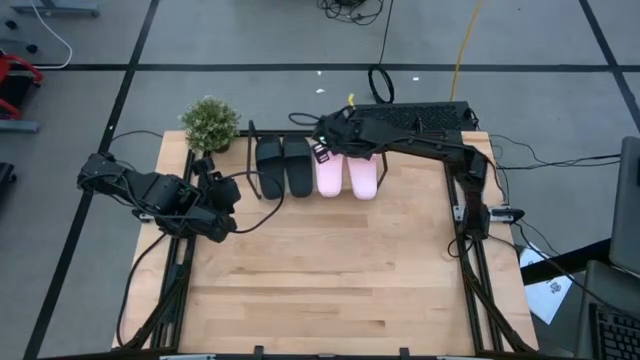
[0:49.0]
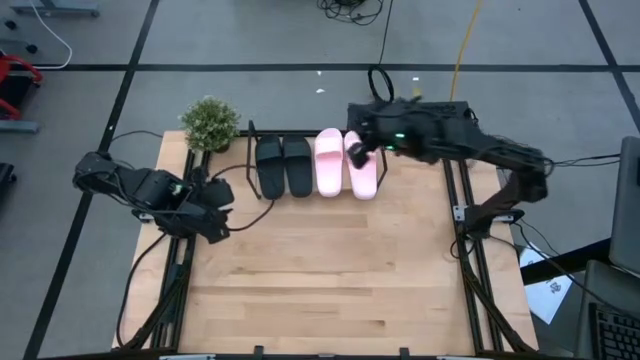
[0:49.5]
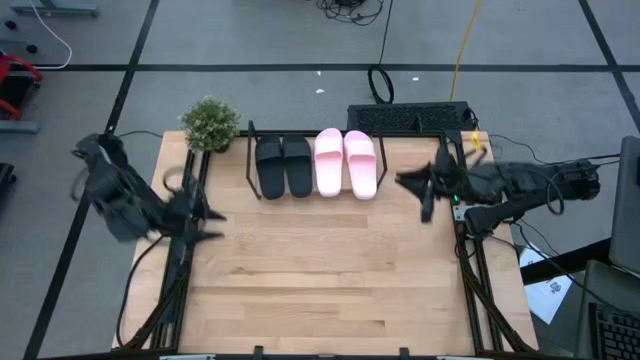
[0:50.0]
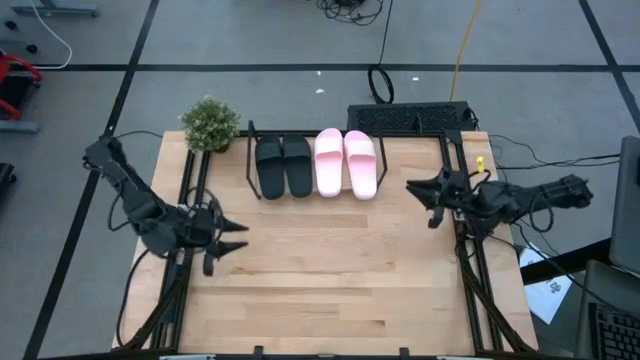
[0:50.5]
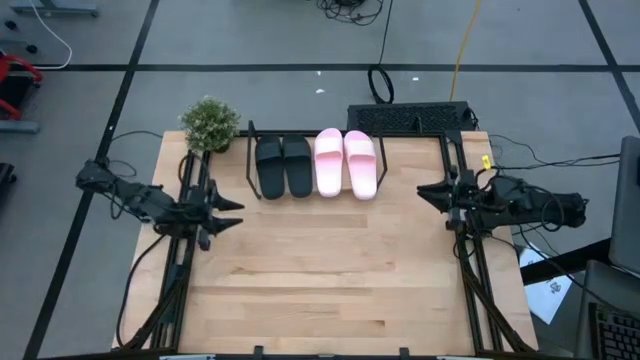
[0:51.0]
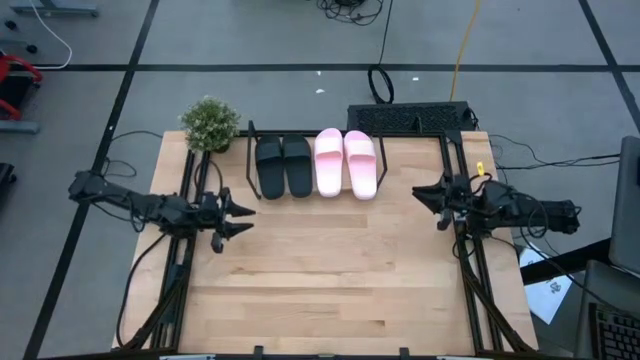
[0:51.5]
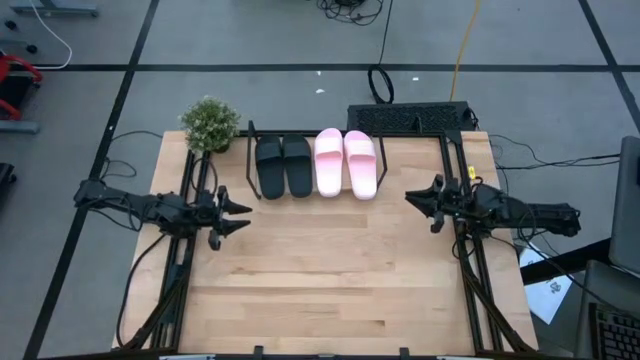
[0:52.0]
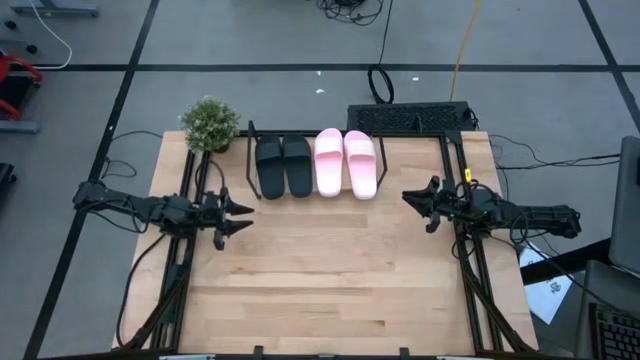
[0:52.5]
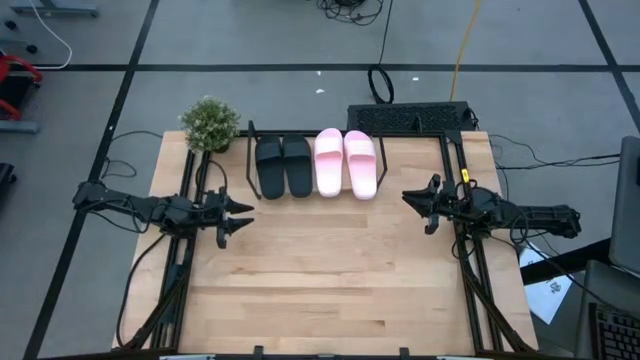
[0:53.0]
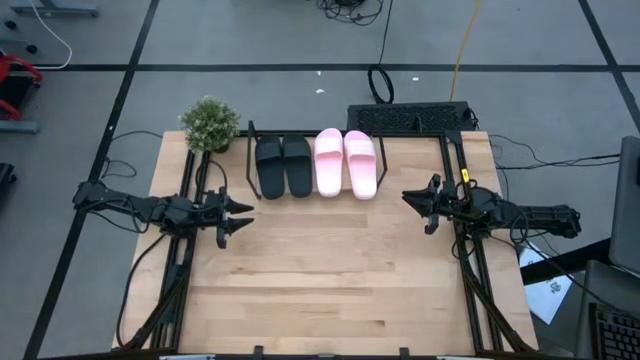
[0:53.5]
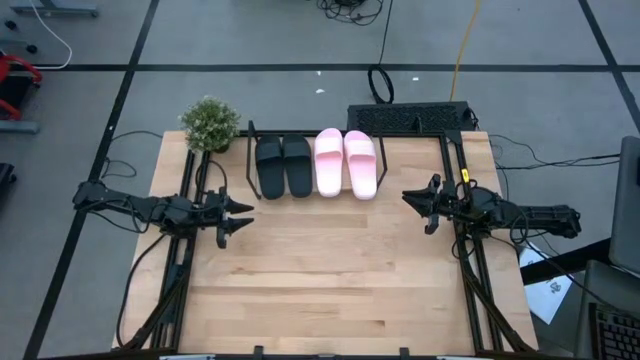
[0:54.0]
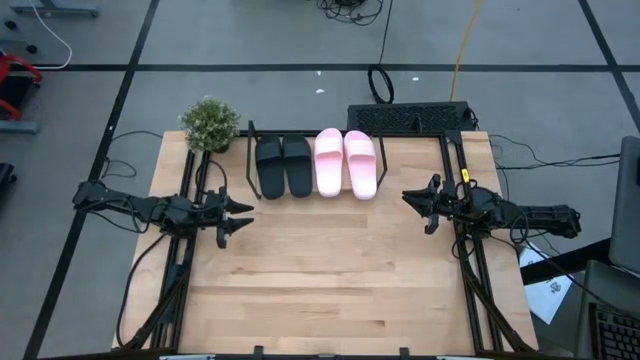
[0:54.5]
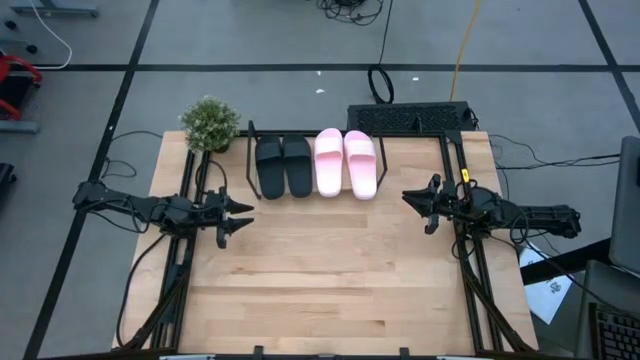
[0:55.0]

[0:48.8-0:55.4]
Task: Pick and place slides into the shelf
Return to Home Position

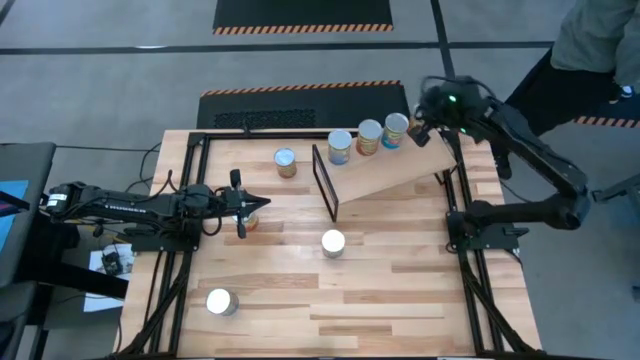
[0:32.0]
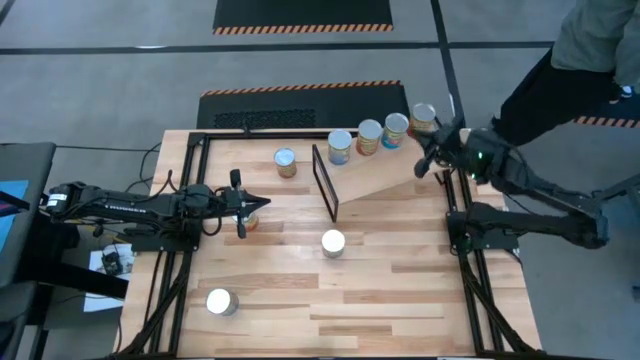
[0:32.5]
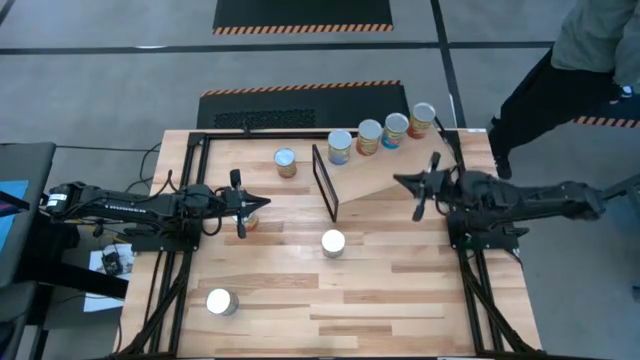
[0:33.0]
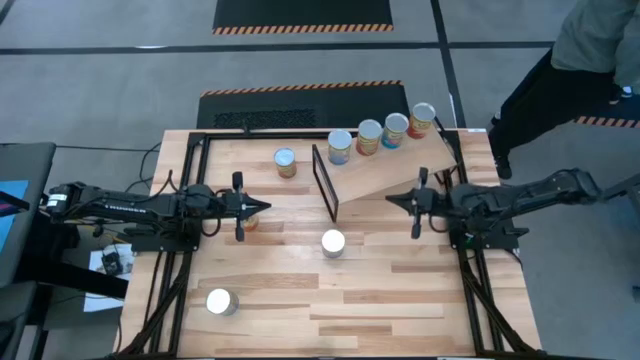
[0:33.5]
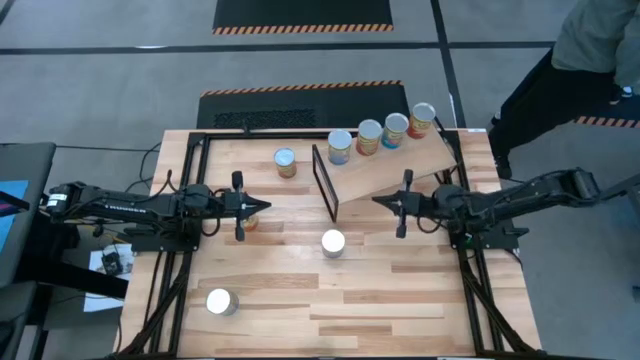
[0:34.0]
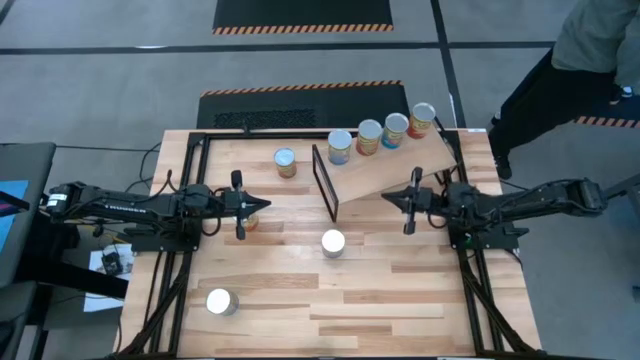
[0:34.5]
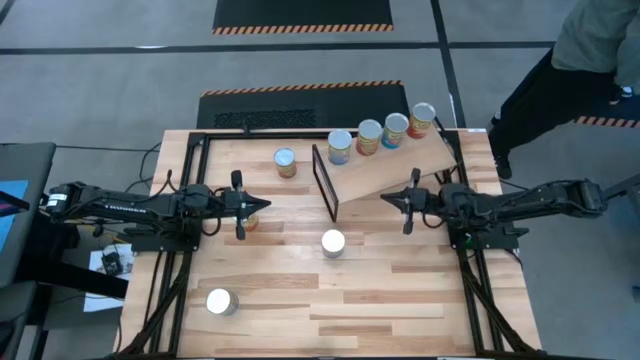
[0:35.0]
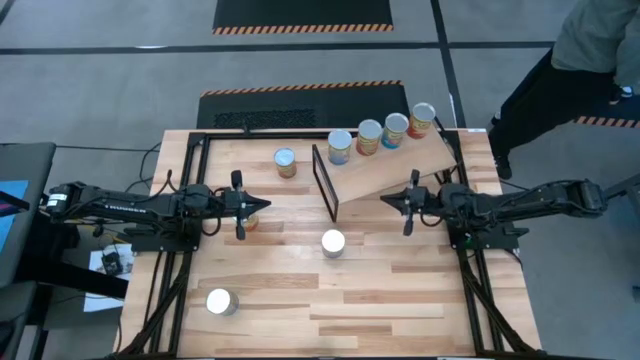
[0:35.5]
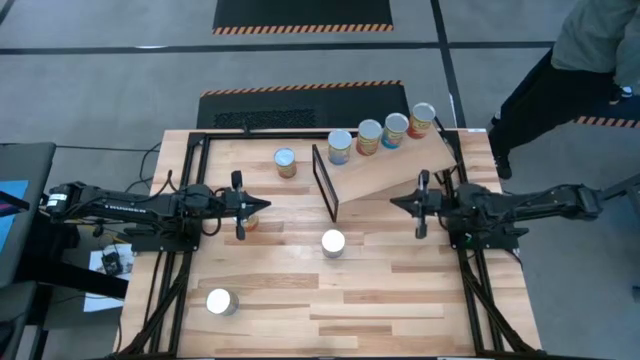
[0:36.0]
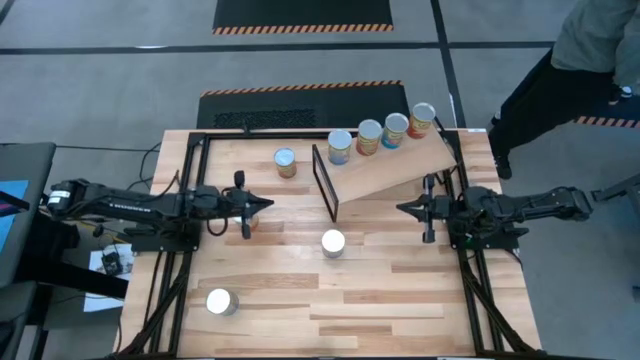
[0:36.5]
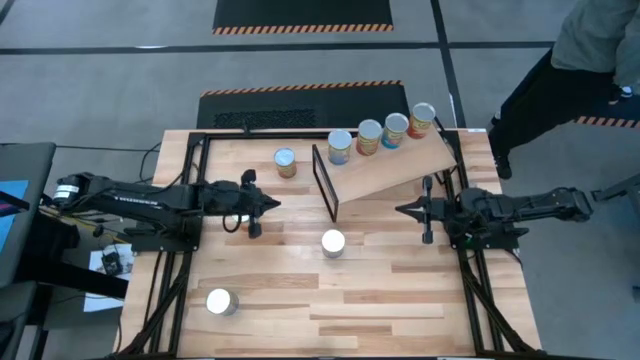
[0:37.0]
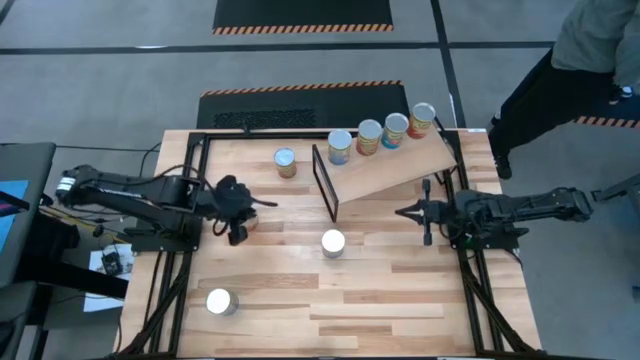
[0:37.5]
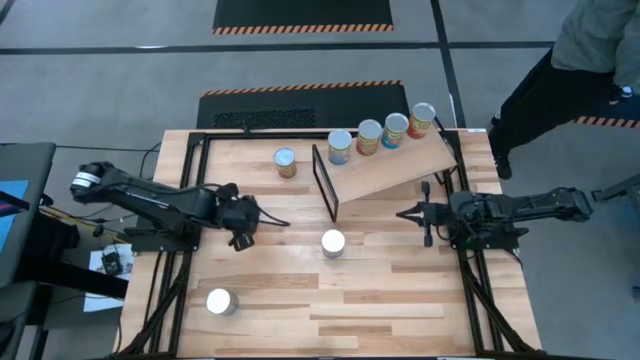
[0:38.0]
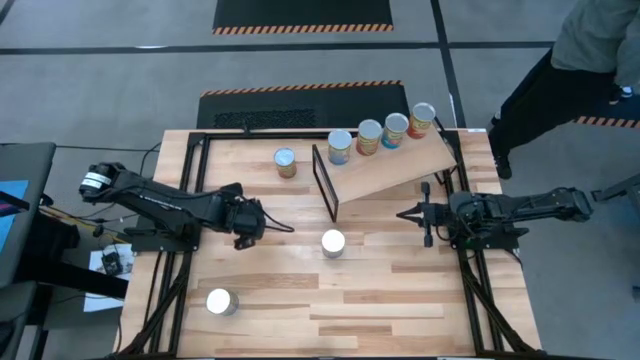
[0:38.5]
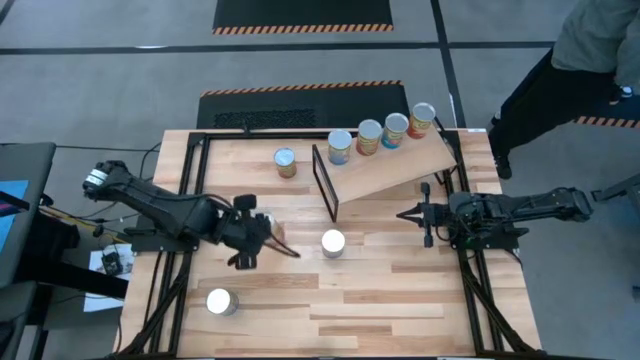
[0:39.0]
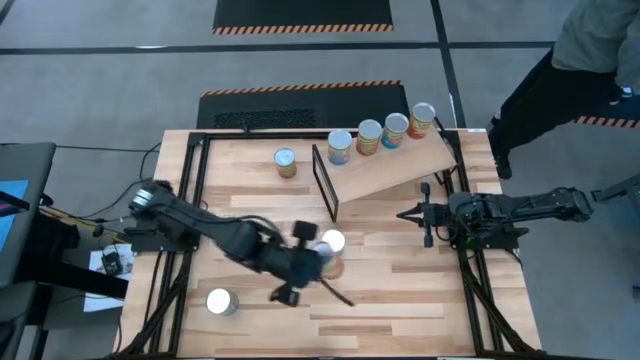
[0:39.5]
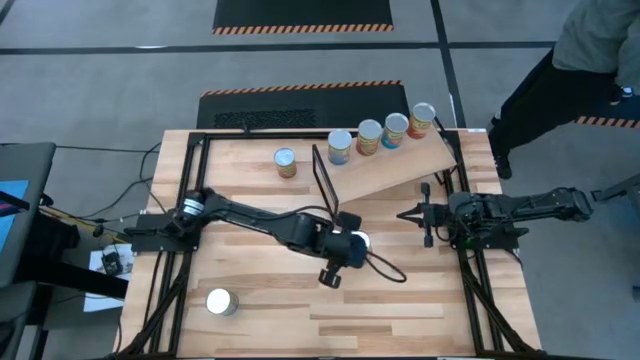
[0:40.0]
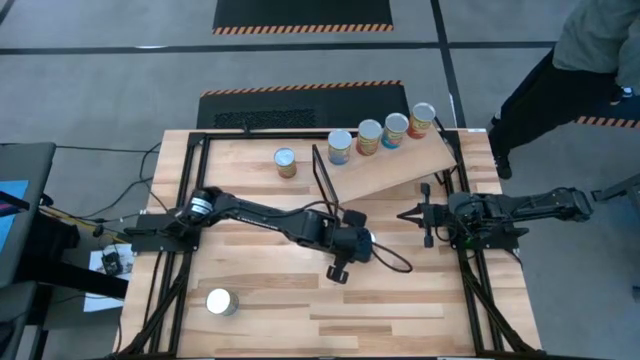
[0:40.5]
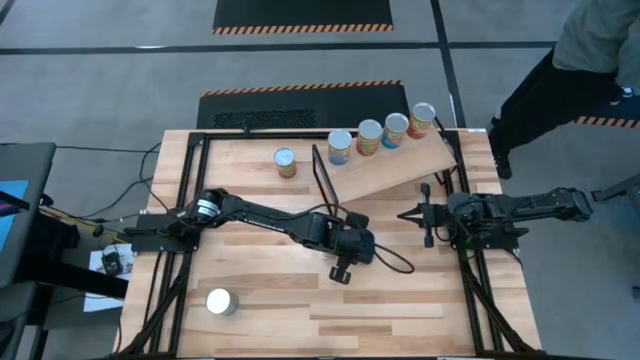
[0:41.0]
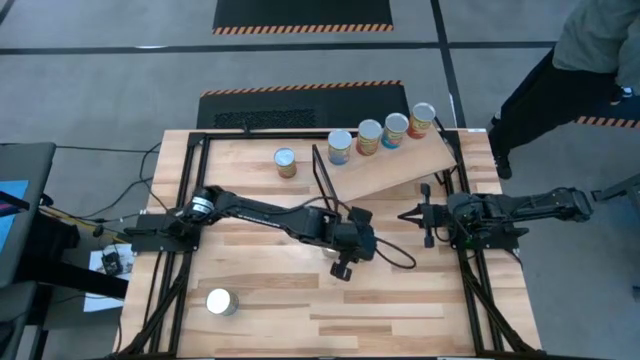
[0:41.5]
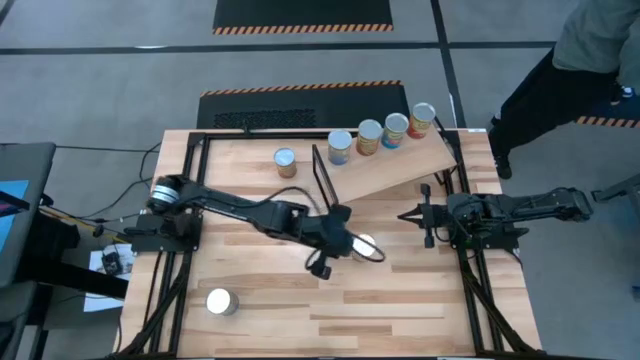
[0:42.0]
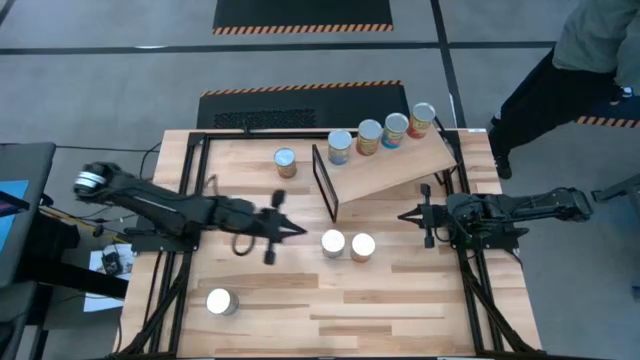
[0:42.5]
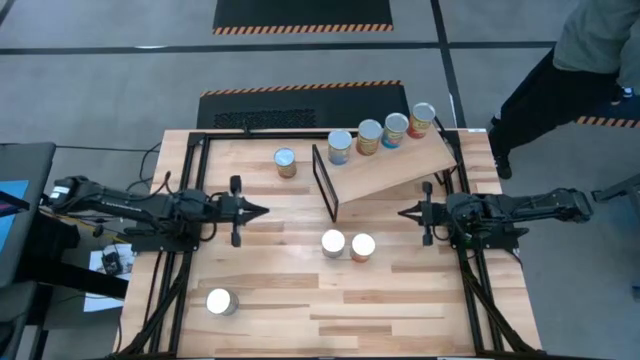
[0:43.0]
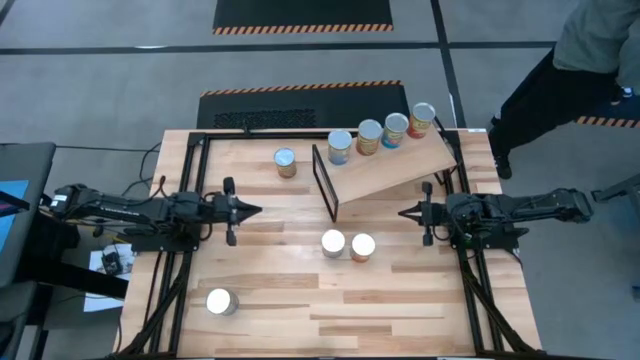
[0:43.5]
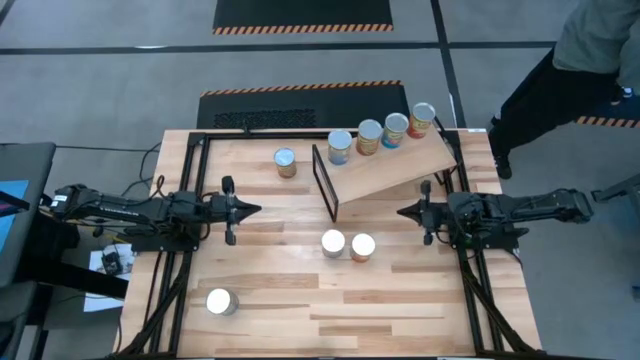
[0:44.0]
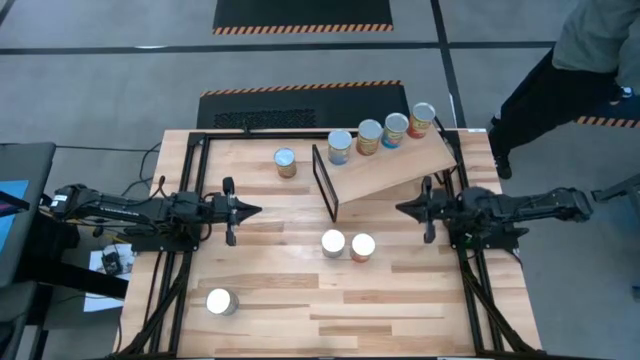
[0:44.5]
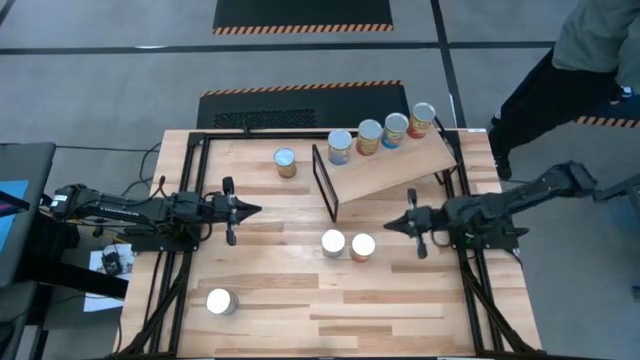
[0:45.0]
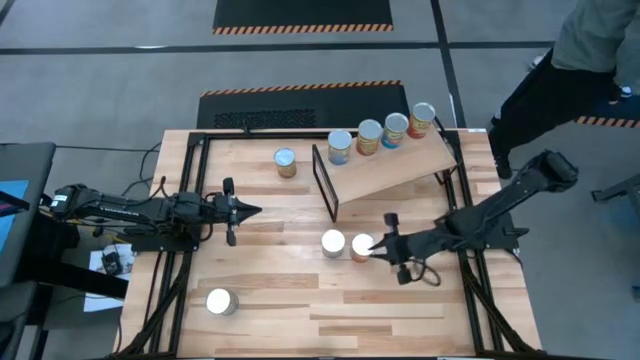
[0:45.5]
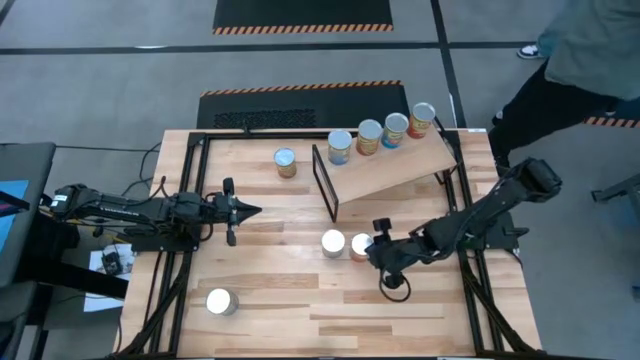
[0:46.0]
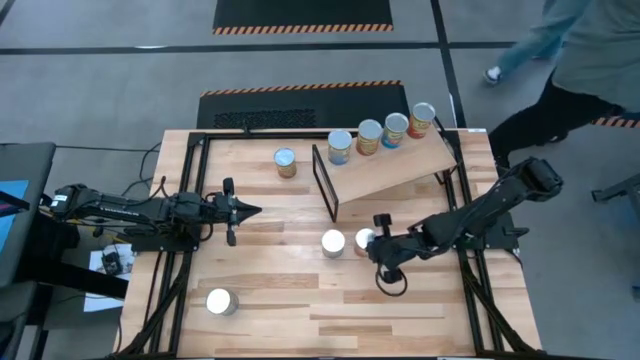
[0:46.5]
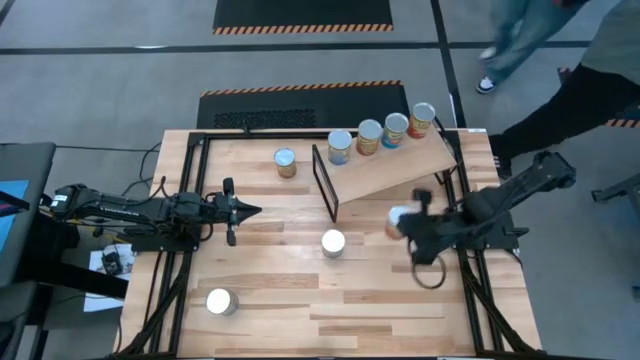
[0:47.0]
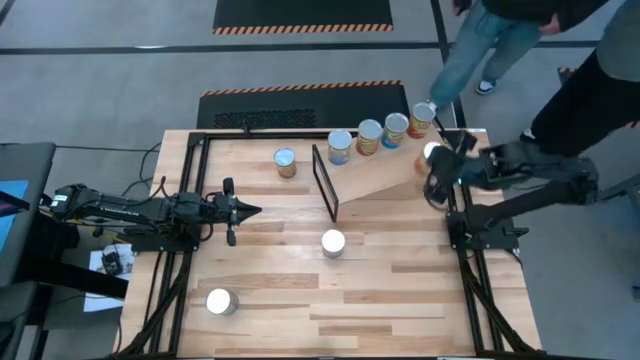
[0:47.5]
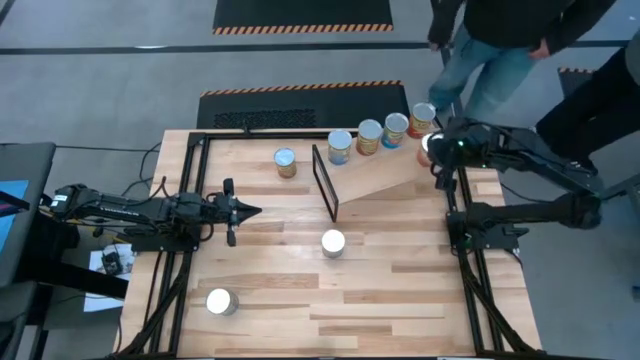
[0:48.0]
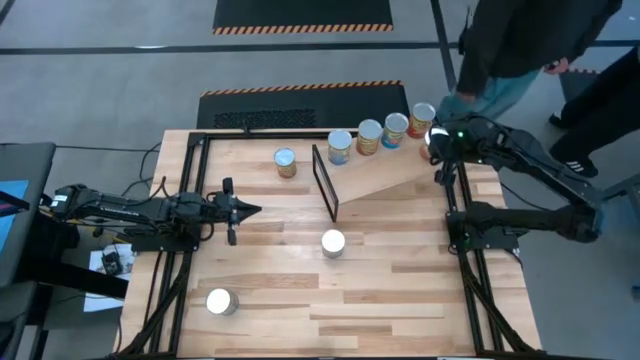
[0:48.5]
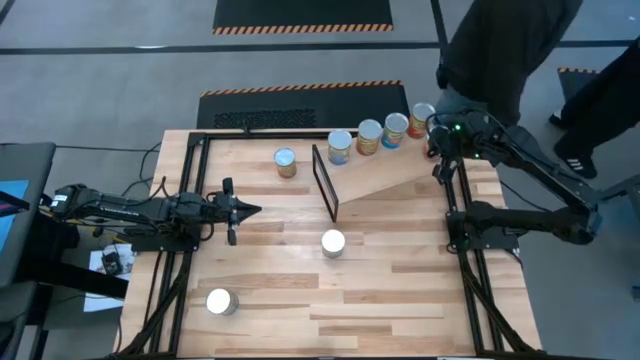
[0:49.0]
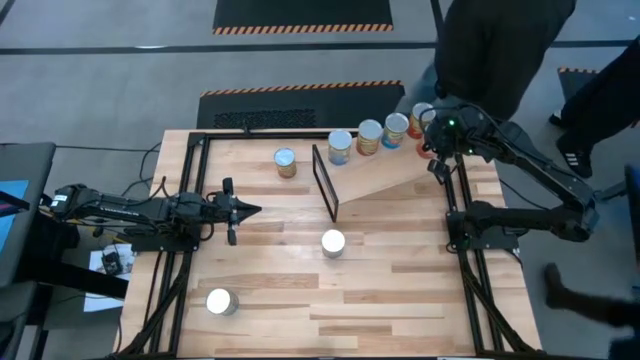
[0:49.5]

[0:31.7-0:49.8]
Task: Pick and place cans onto a shelf
Put the canned corn aligned with the other canned corn on the shelf
